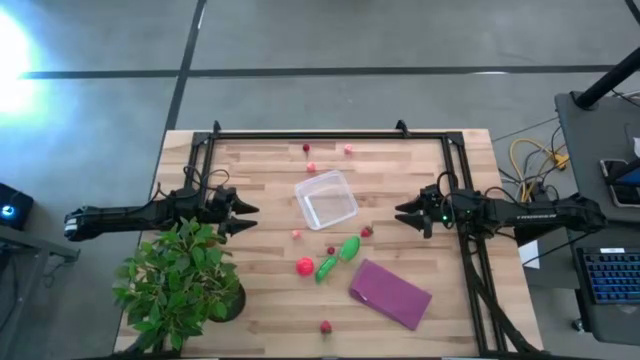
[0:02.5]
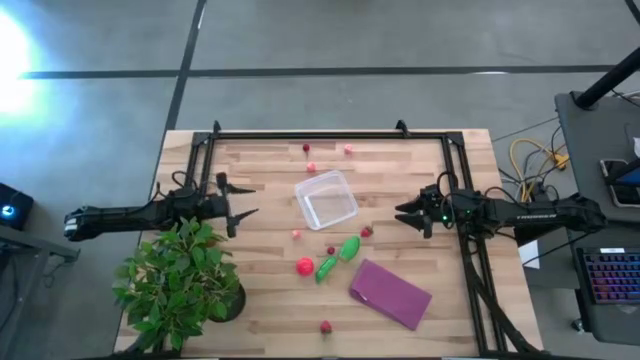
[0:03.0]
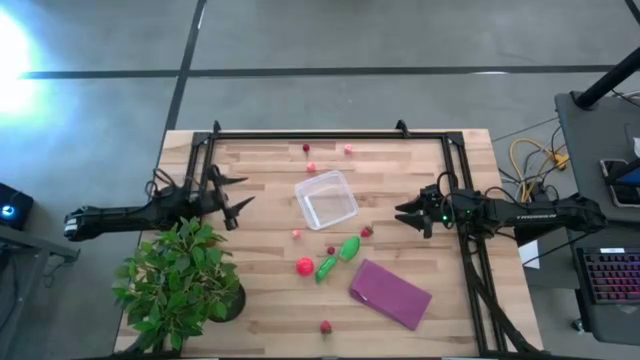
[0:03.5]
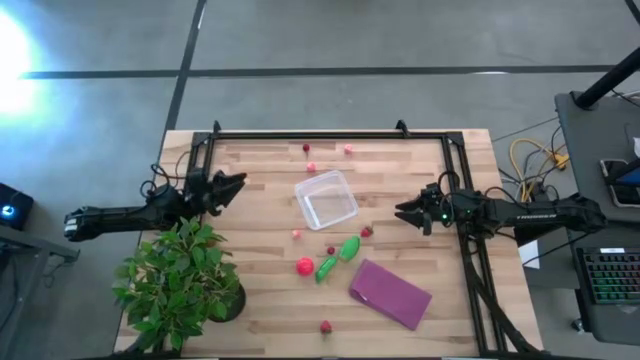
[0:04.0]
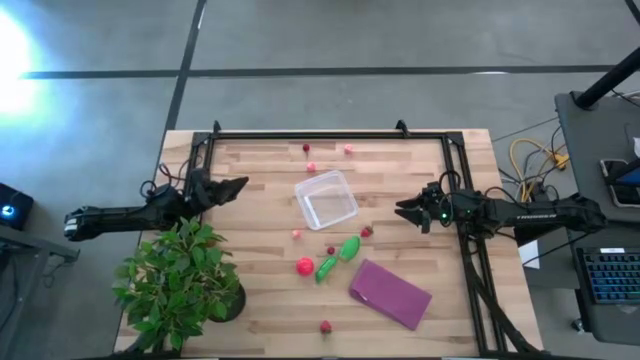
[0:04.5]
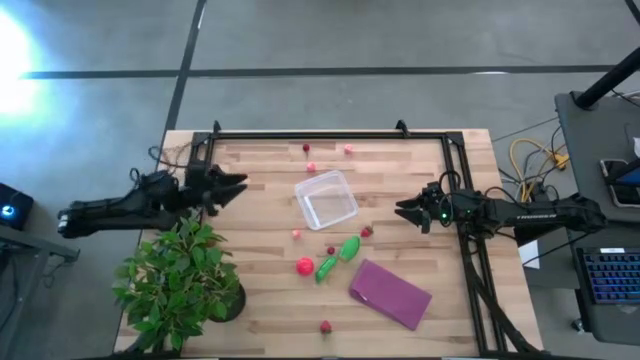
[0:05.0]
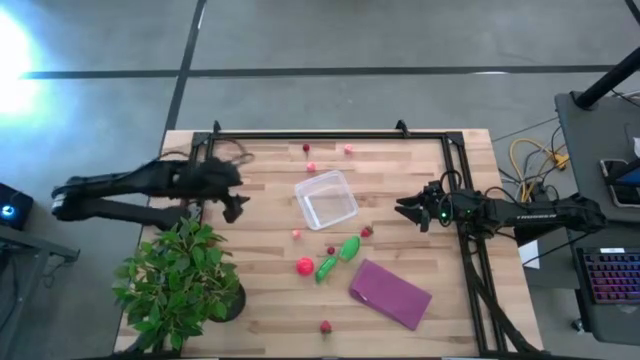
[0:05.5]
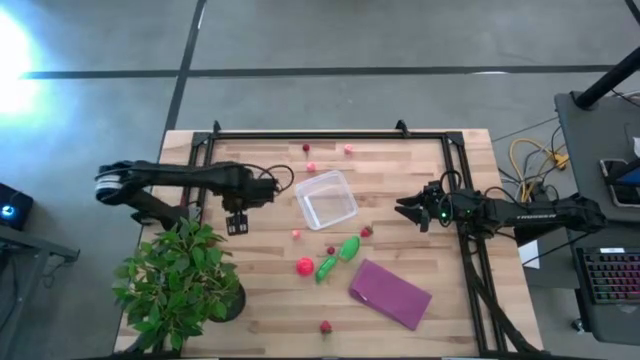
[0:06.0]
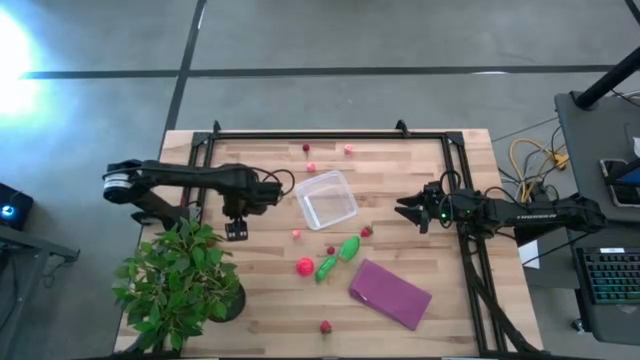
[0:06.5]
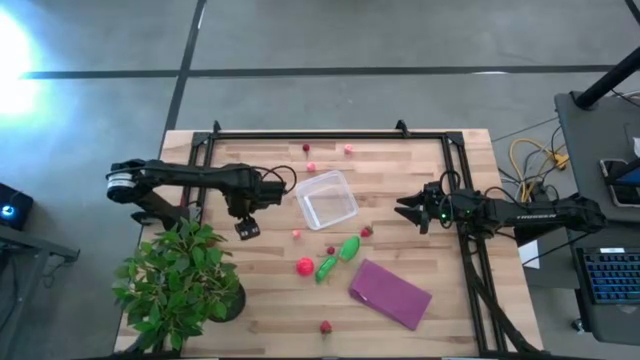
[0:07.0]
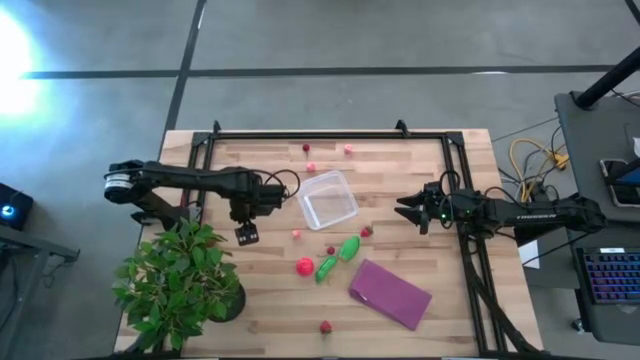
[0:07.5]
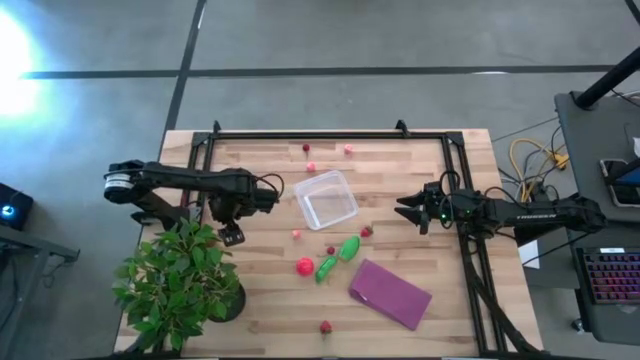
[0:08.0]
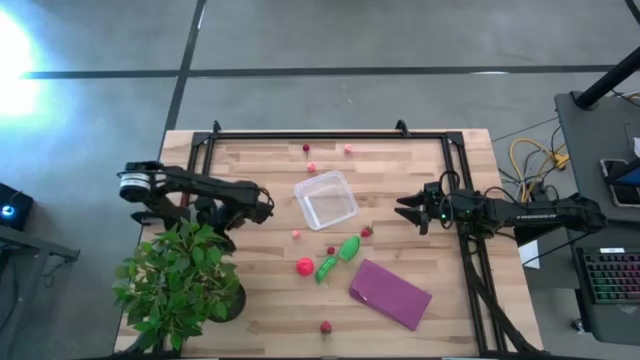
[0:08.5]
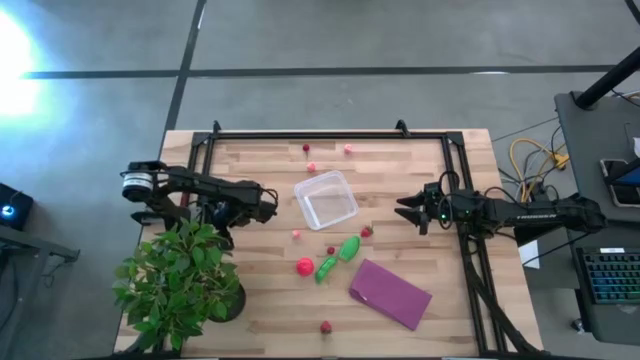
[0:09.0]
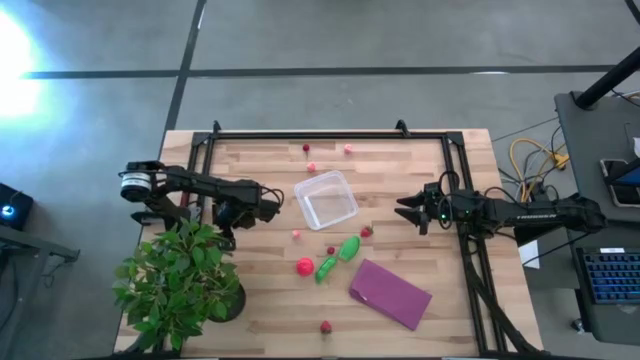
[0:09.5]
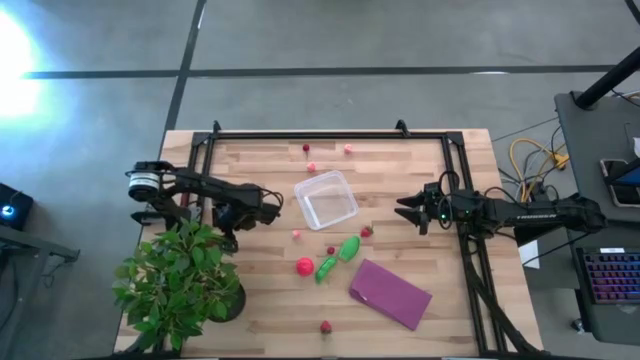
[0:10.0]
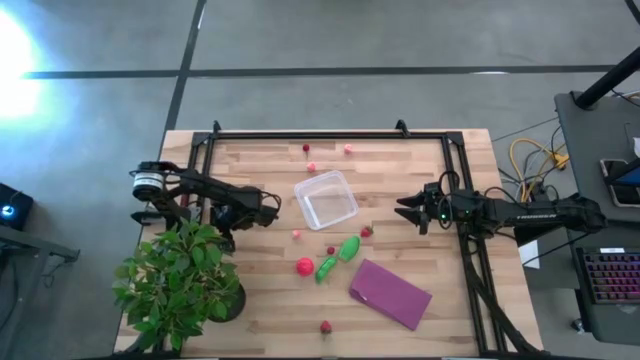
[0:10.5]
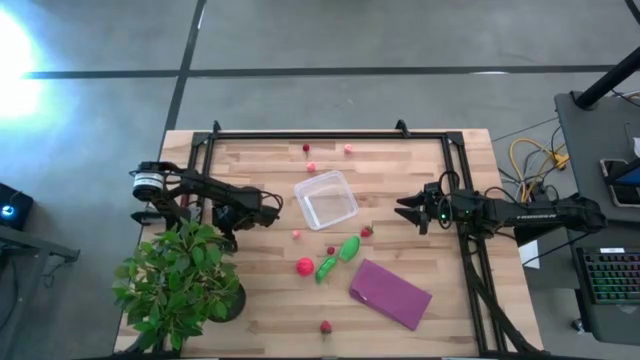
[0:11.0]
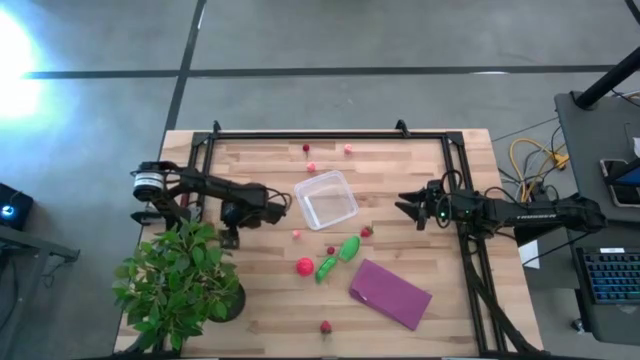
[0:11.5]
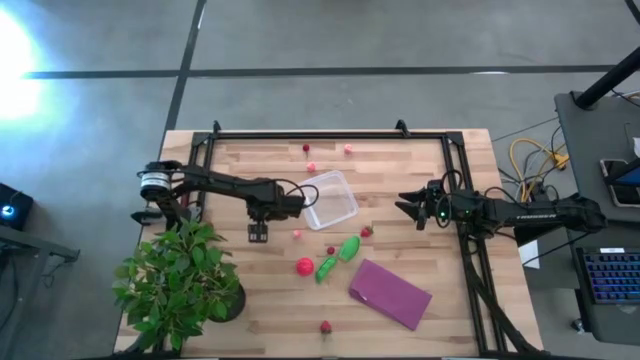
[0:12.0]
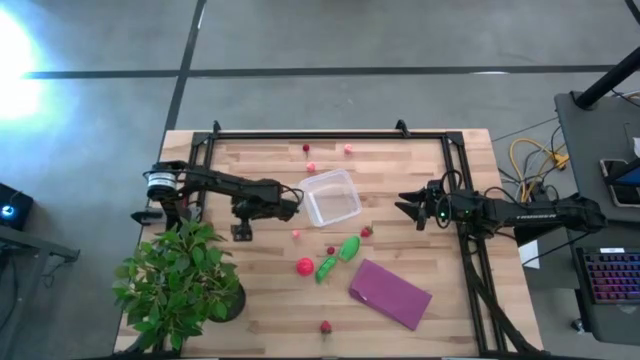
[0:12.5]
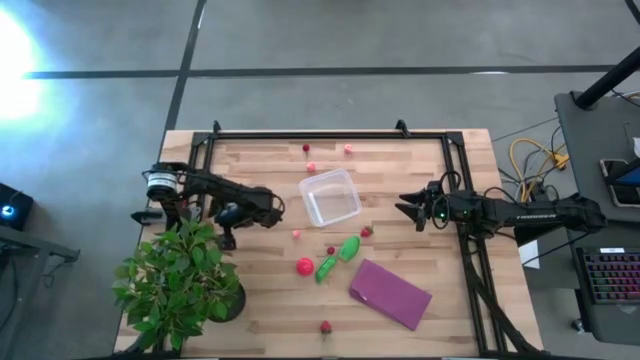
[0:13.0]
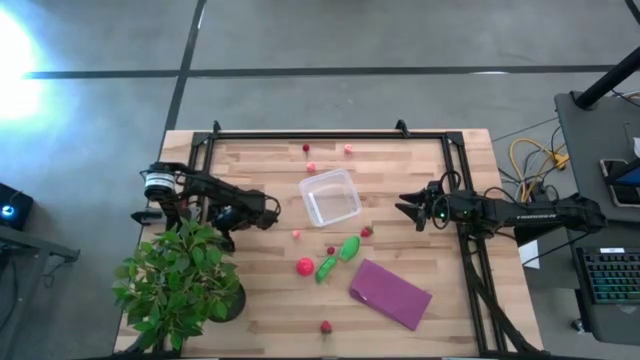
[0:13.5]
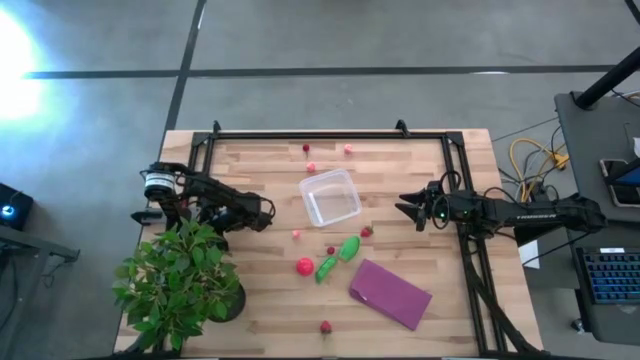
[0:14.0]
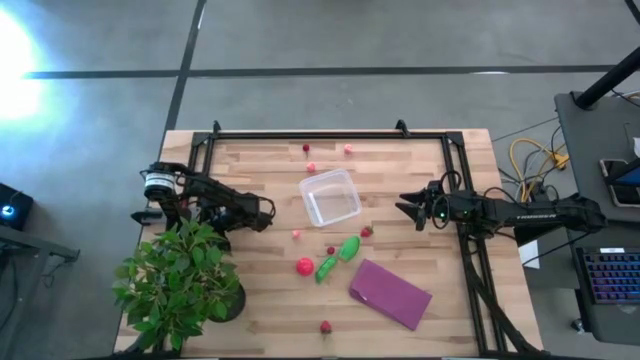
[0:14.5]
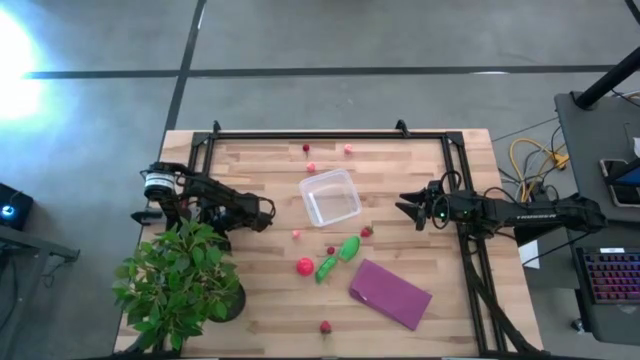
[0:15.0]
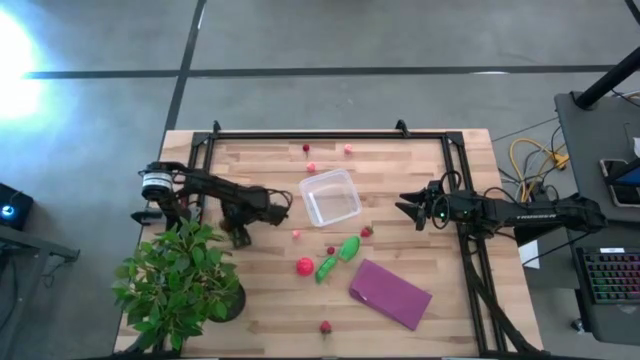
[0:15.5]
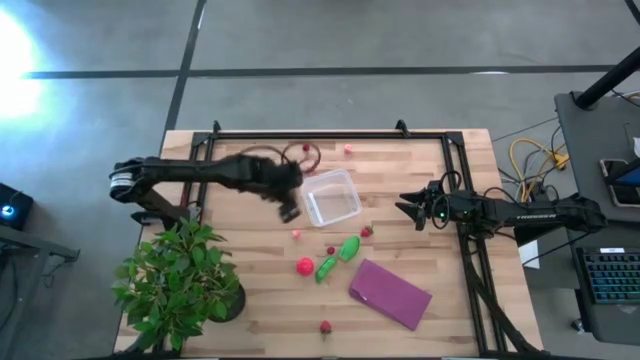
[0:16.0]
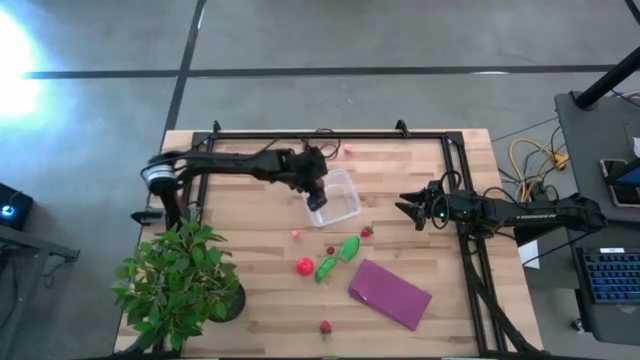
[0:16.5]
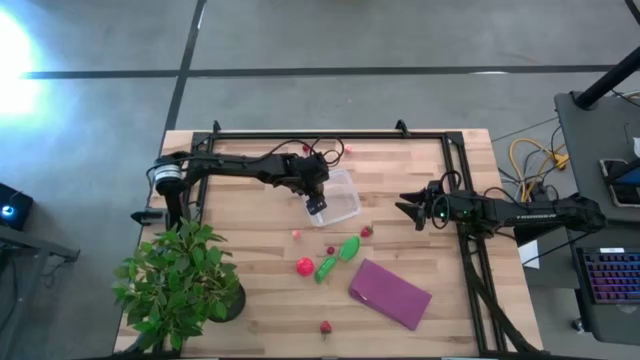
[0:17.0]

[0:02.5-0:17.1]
Task: Pick and placing Produce into tupperware
Put the brown kiwi into the transparent bin

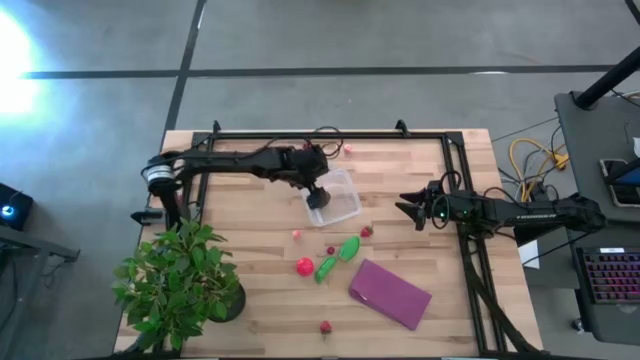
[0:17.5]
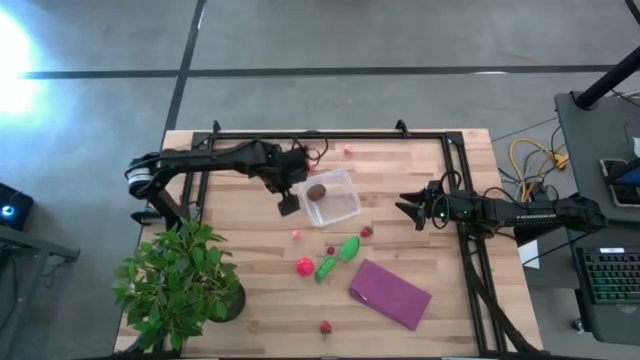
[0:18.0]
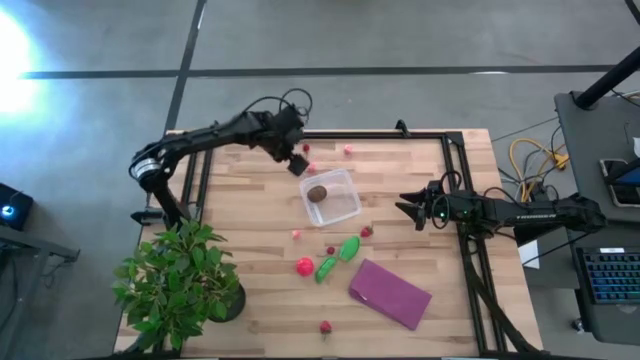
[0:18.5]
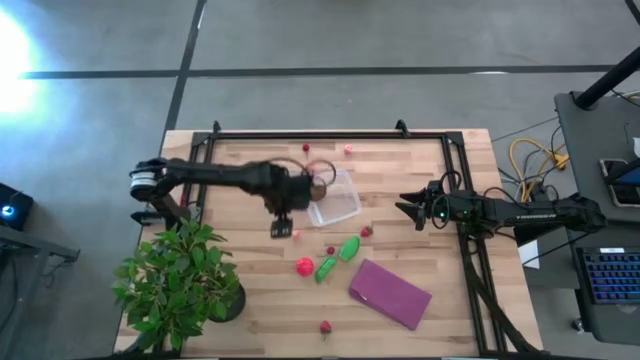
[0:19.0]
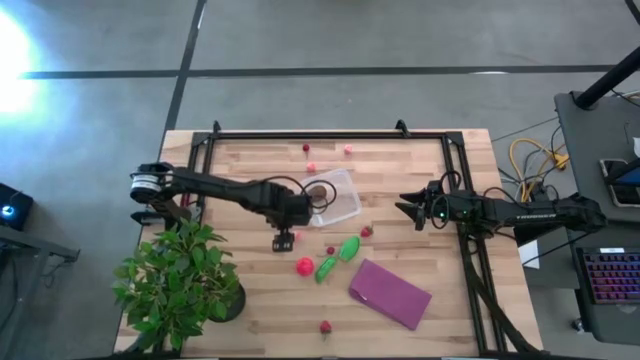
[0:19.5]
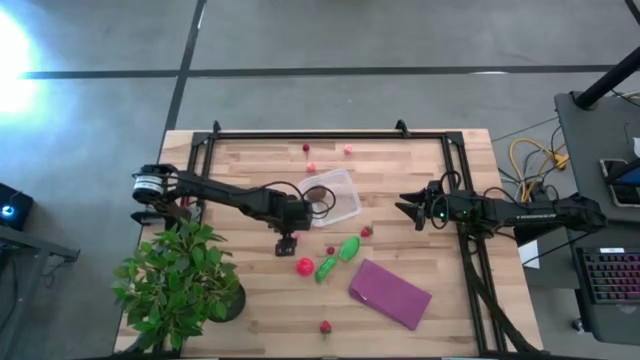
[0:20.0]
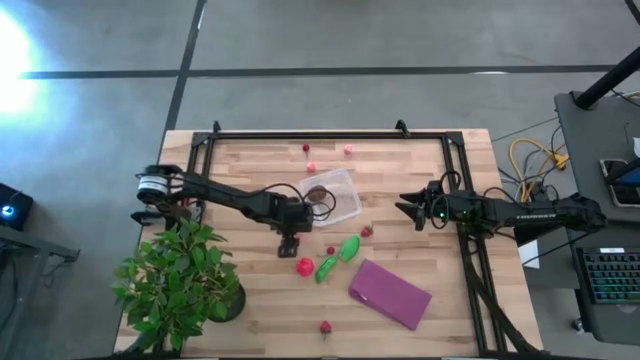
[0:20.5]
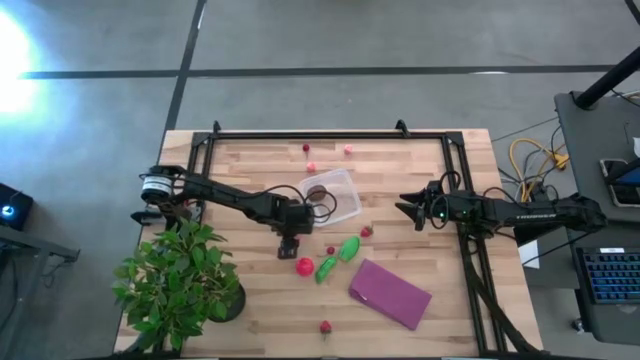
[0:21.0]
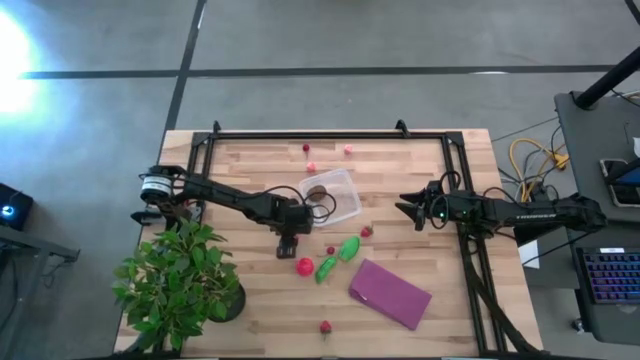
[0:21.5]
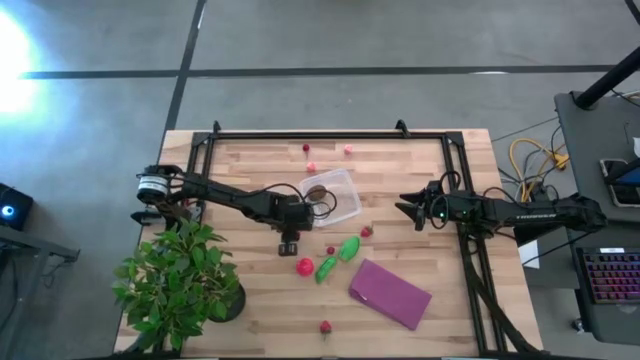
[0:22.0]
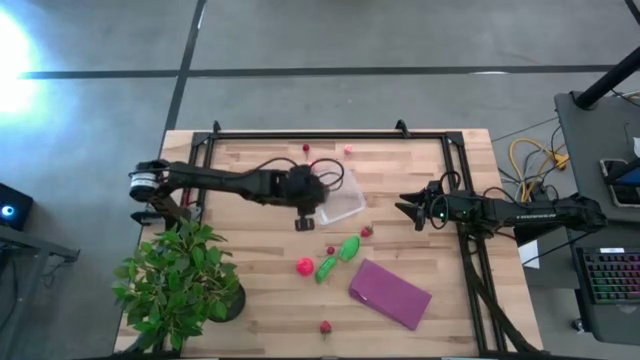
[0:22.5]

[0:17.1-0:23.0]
Put the bottom pink peach into the transparent bin

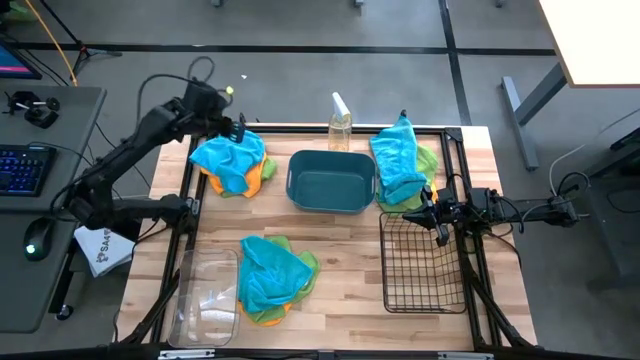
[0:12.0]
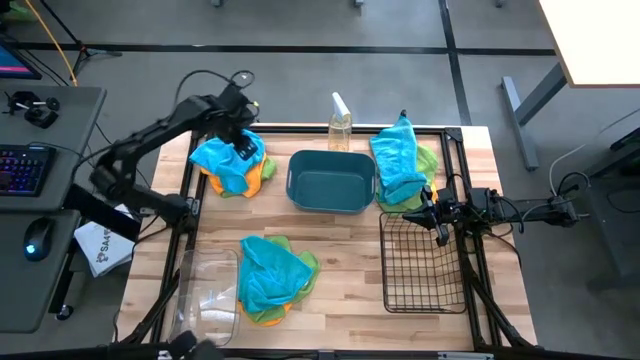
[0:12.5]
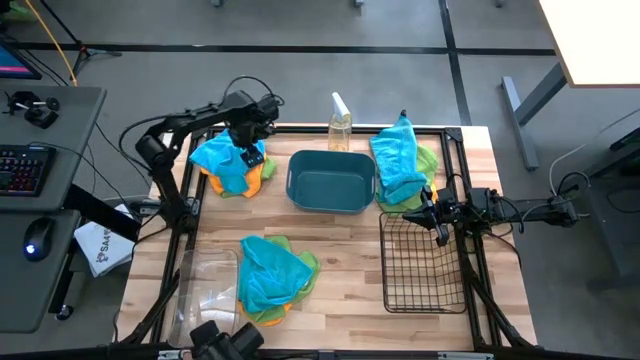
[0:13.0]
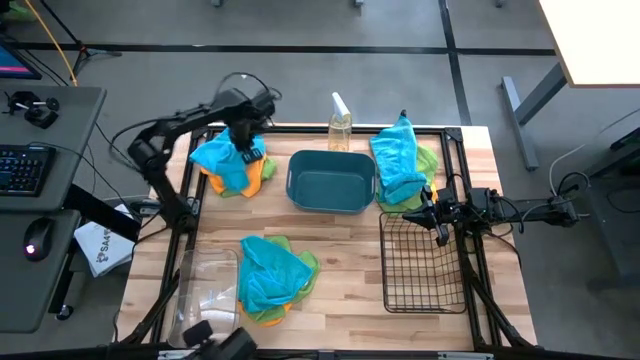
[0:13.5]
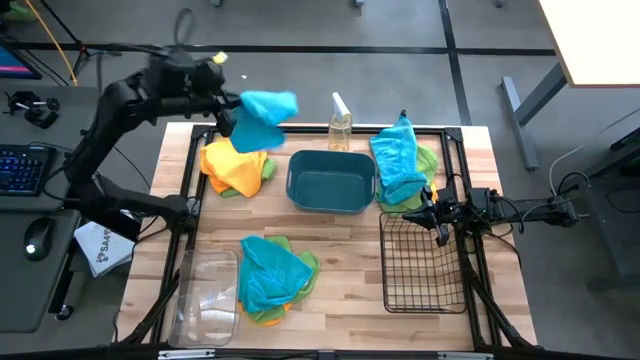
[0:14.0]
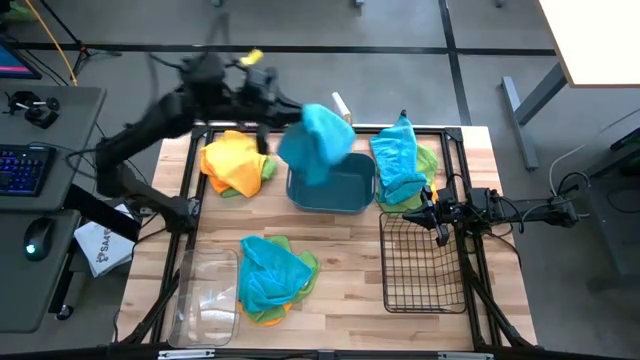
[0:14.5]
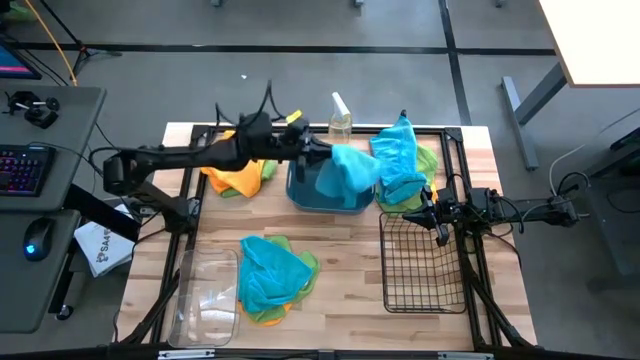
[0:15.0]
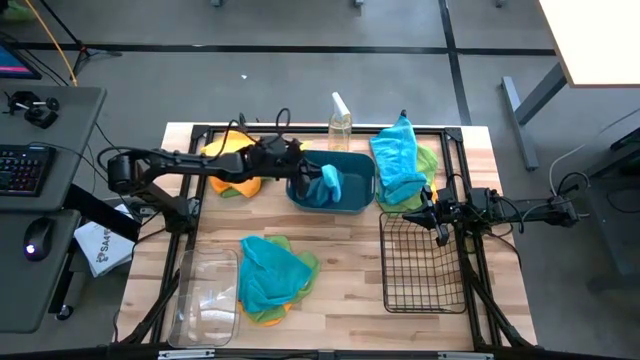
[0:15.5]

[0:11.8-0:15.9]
Task: Sort microfiber towel by color & place in baskets
Put the top left blue towel into the blue bin
